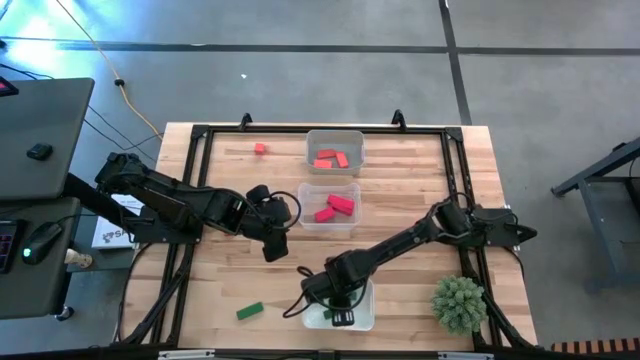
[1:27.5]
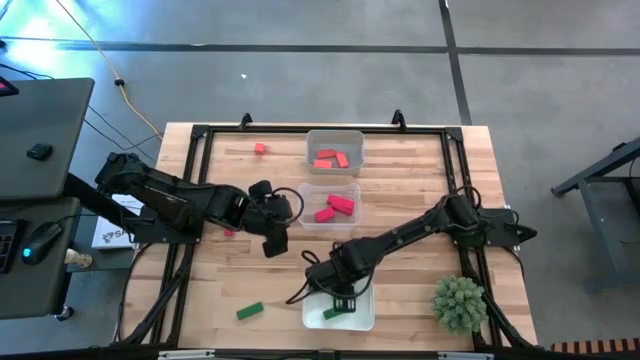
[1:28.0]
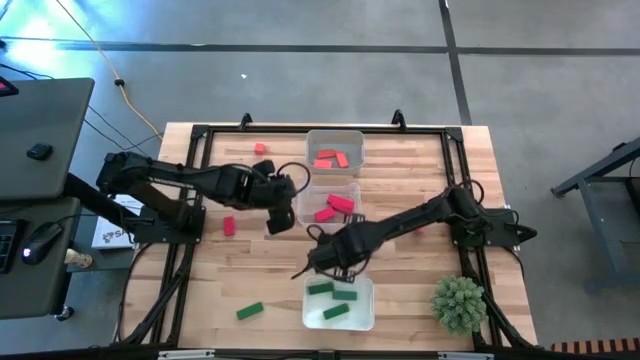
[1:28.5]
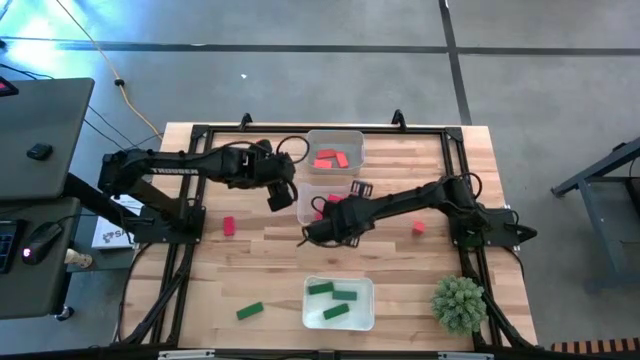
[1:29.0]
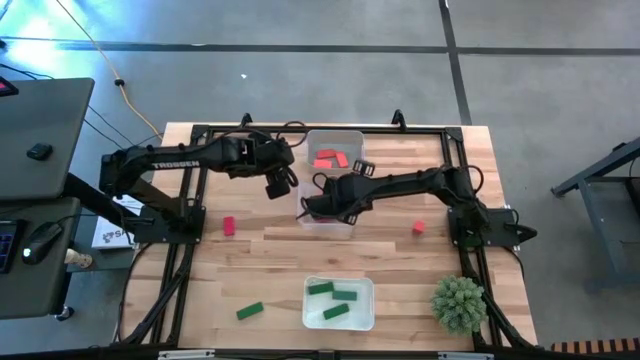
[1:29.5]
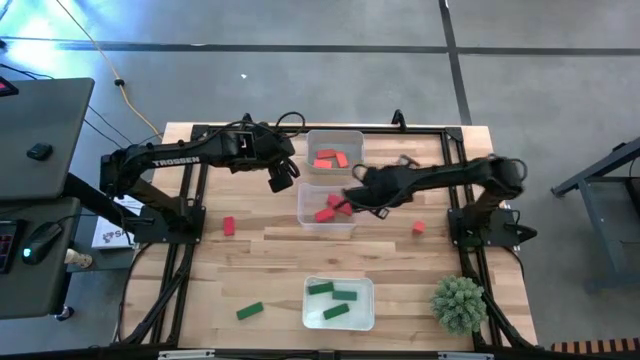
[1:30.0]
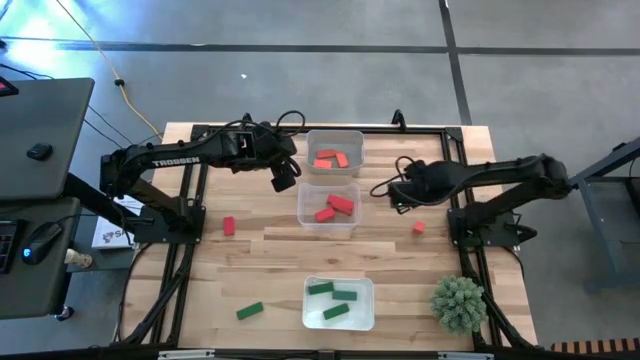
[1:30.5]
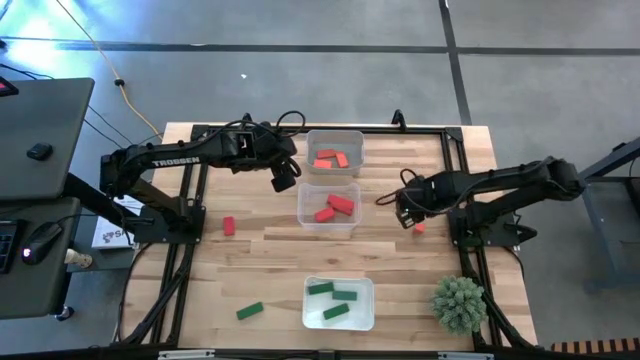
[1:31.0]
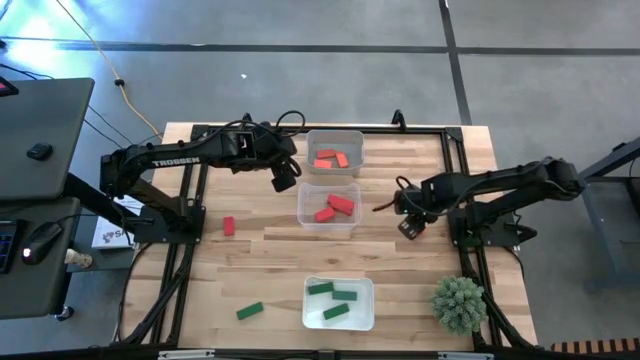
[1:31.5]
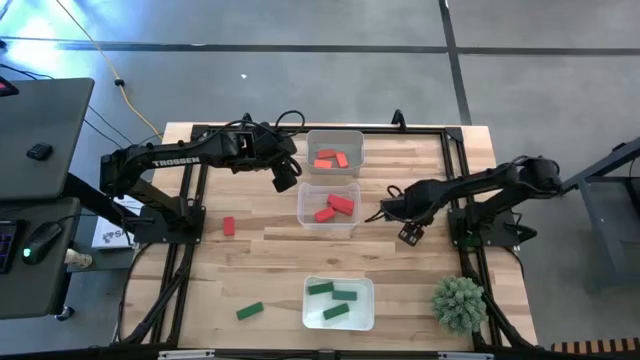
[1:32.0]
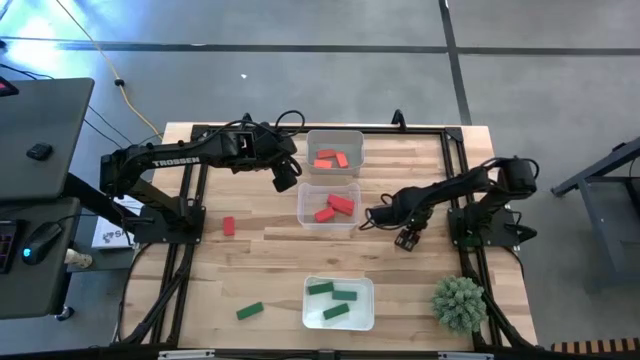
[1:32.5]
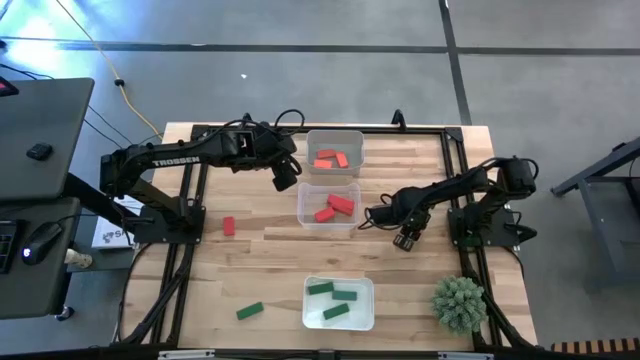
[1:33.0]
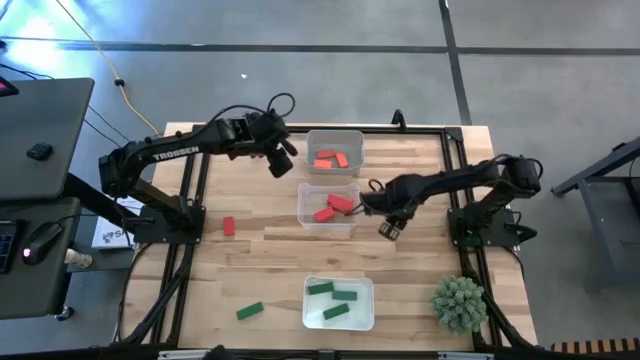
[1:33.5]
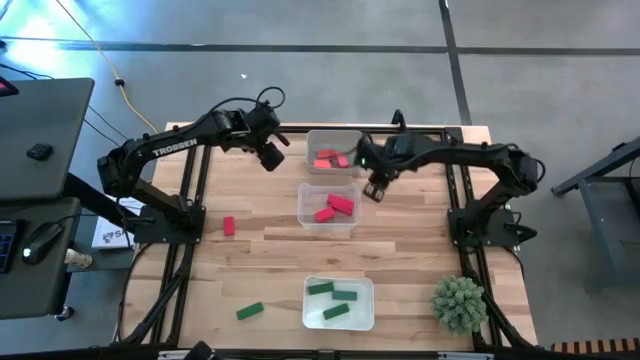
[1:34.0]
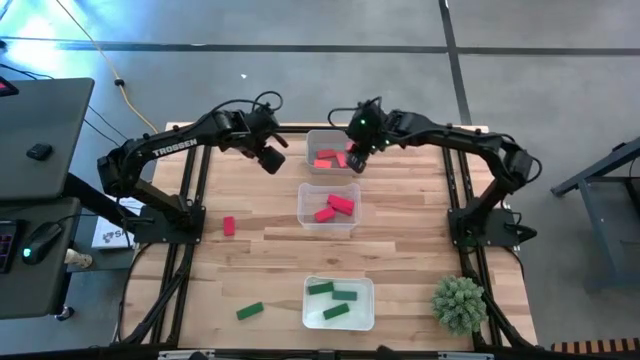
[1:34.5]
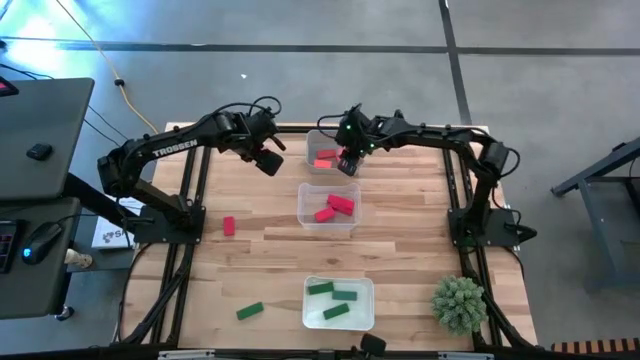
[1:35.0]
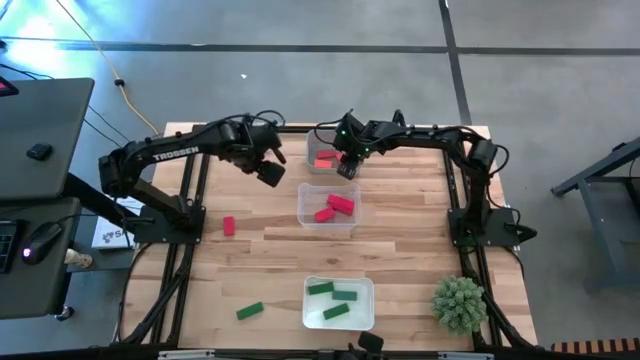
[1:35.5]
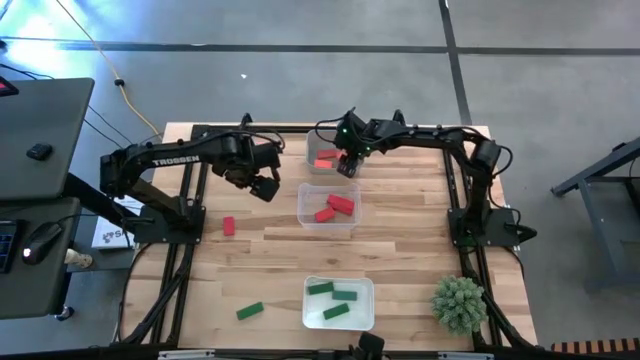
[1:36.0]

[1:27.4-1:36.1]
Task: Sort & place blocks by color
Put the orange block into the gray bin

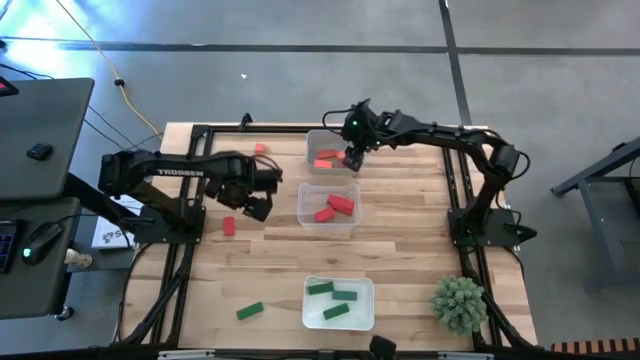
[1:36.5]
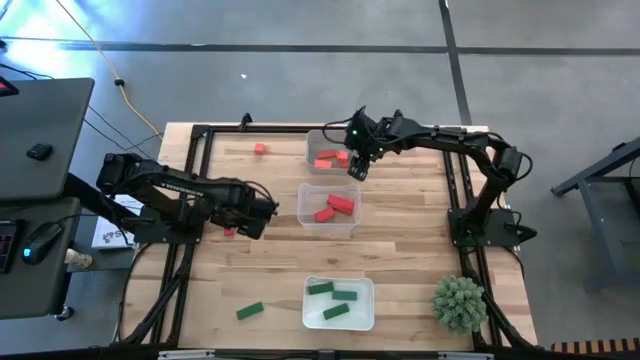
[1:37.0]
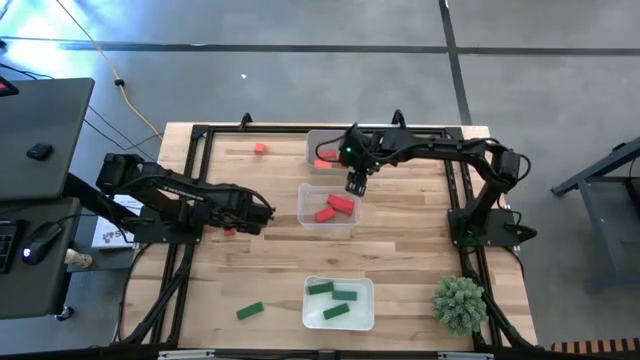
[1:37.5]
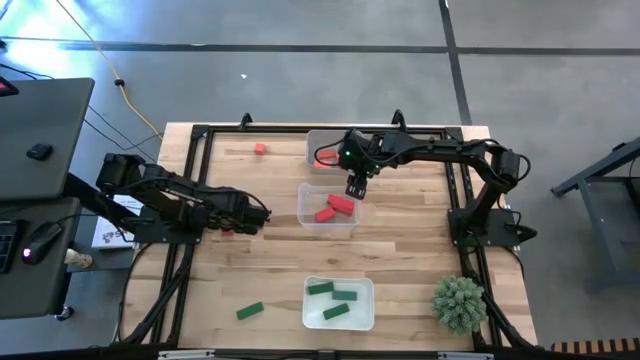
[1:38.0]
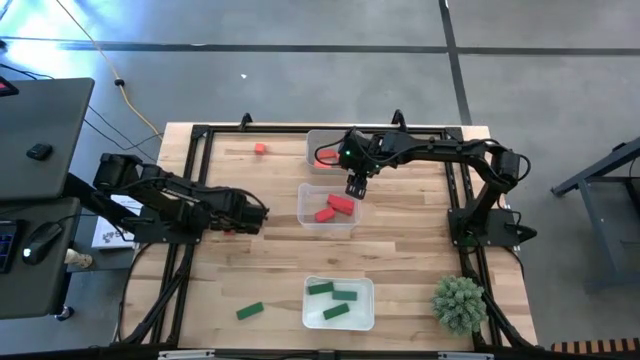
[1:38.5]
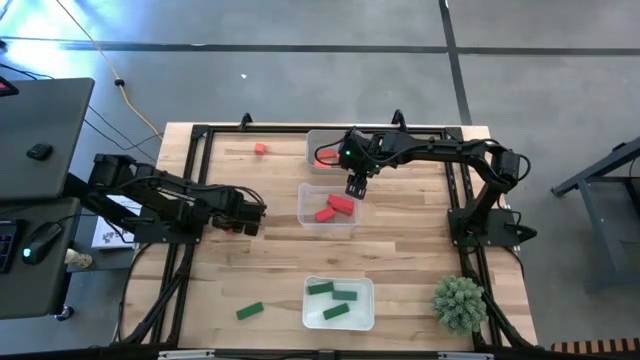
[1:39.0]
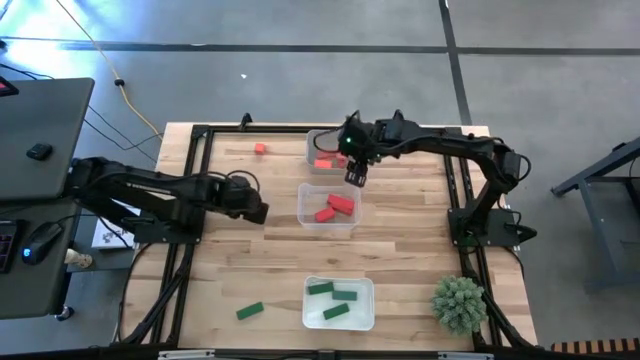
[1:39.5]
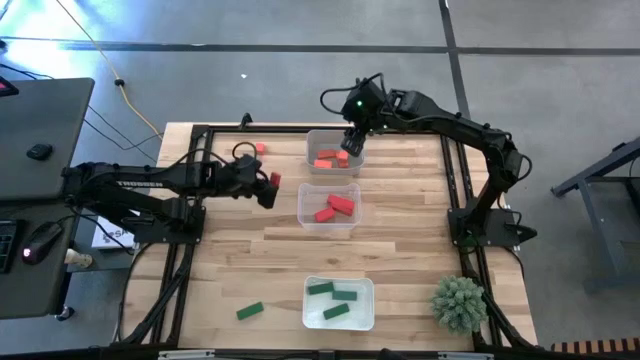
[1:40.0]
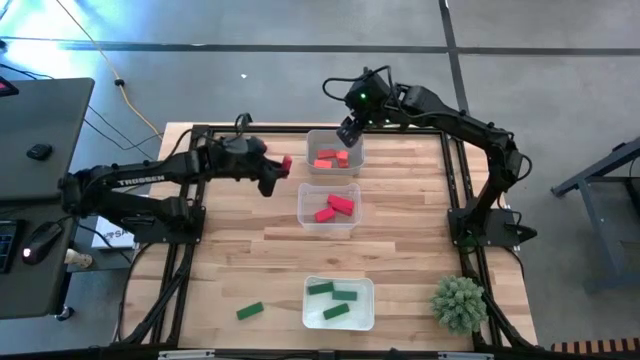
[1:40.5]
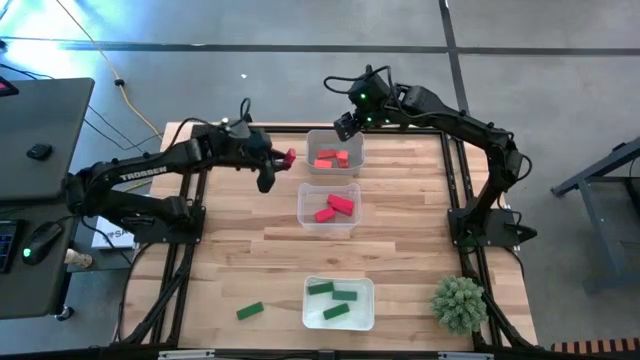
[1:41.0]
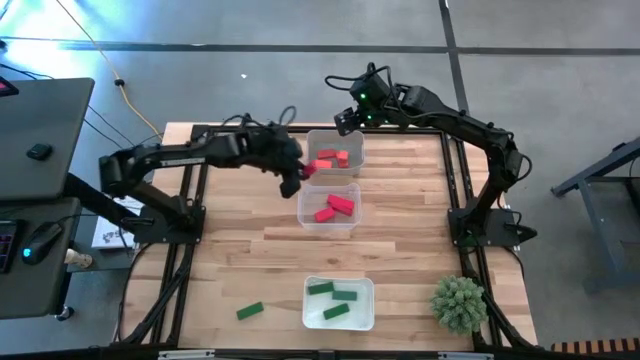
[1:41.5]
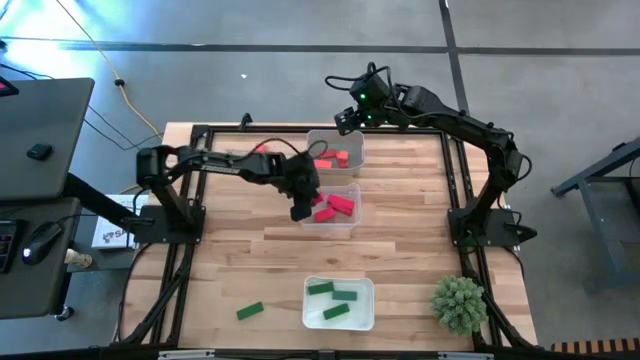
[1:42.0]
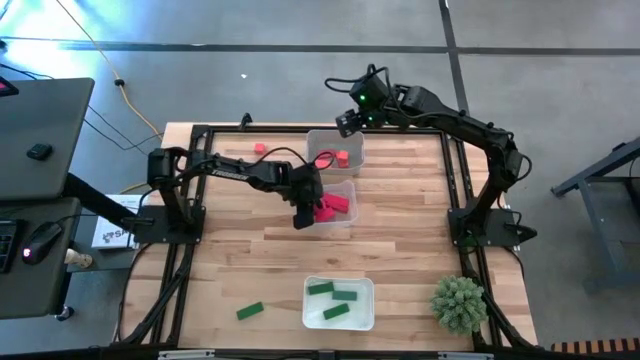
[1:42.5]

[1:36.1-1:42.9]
Put the red block into the transparent bin

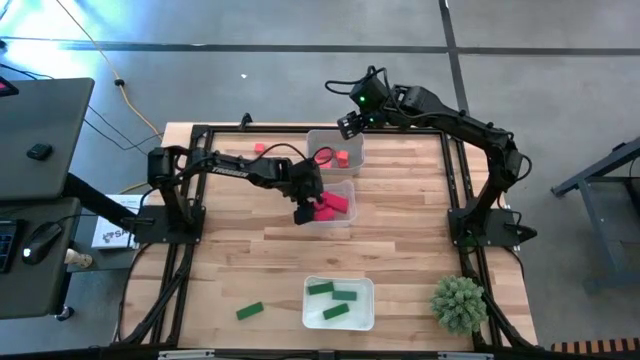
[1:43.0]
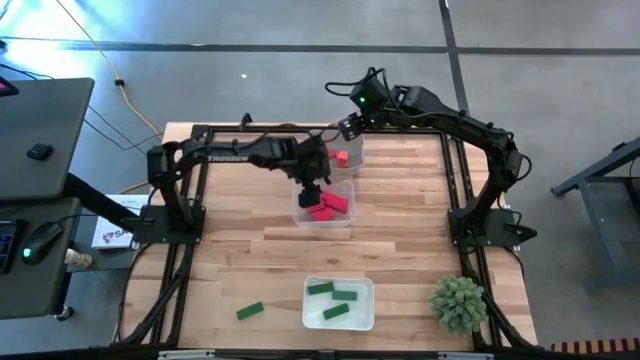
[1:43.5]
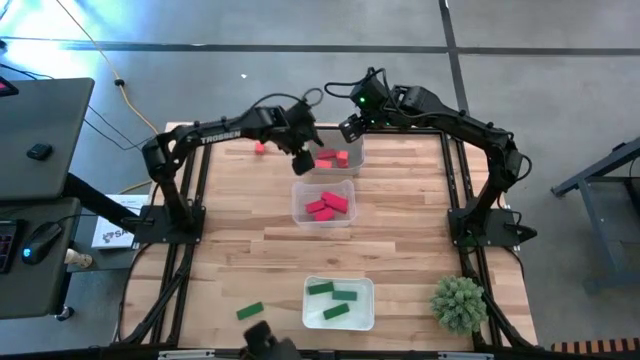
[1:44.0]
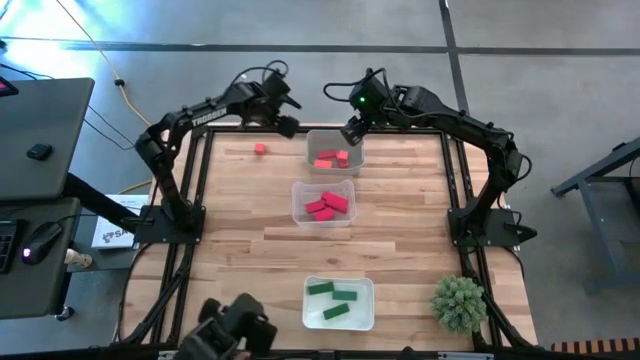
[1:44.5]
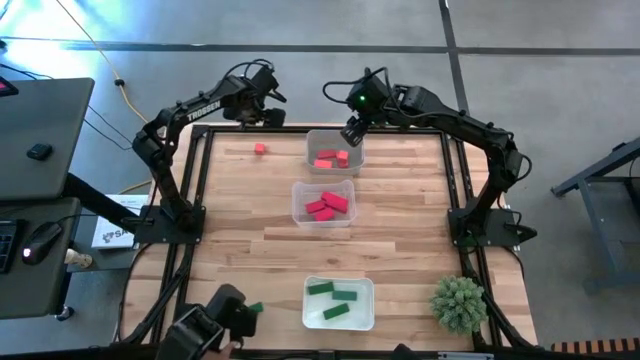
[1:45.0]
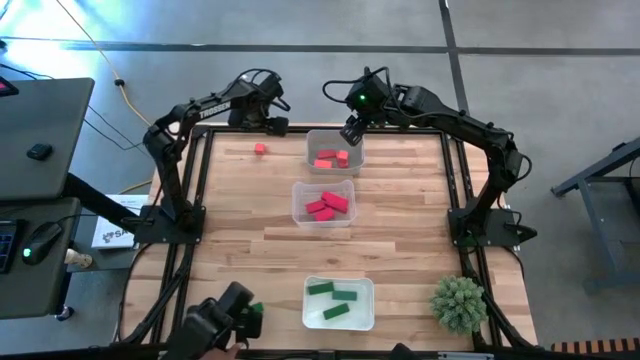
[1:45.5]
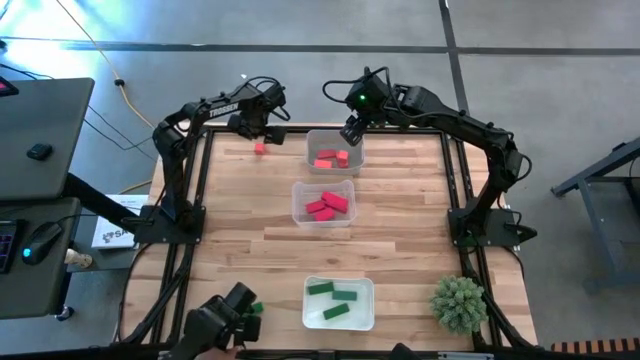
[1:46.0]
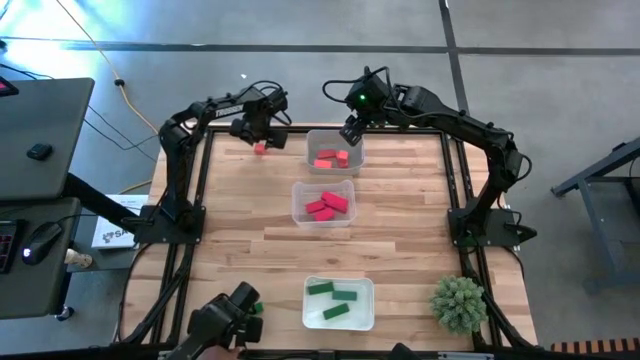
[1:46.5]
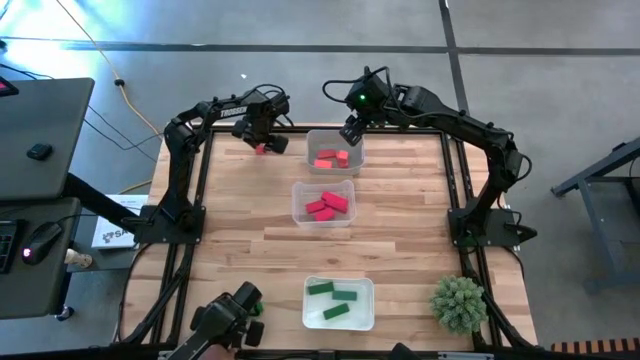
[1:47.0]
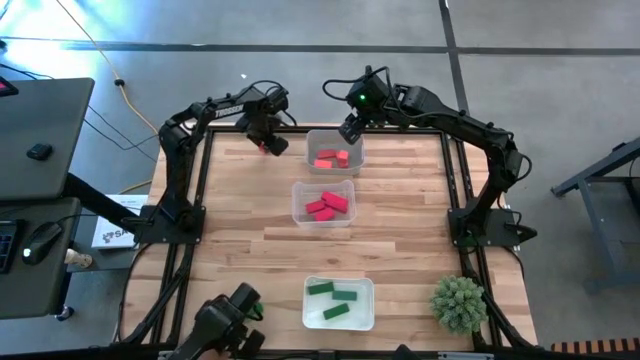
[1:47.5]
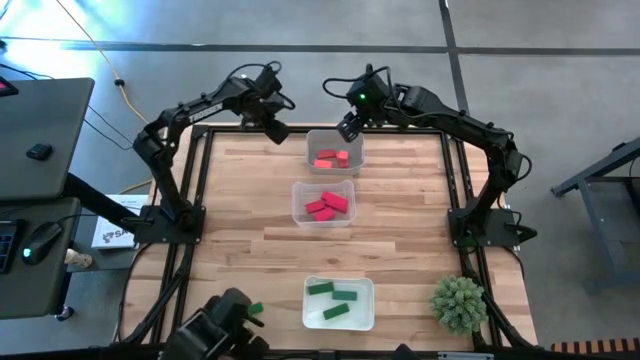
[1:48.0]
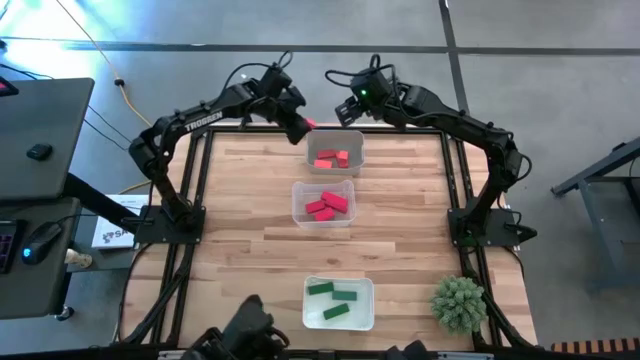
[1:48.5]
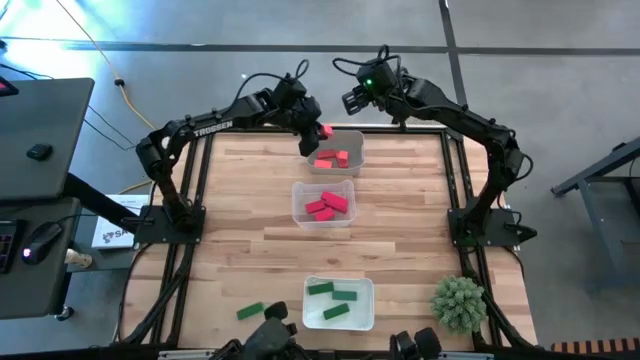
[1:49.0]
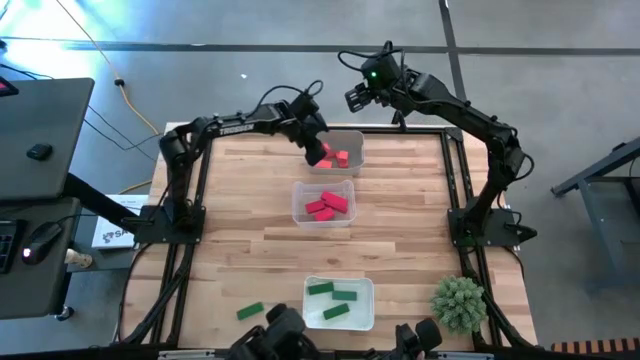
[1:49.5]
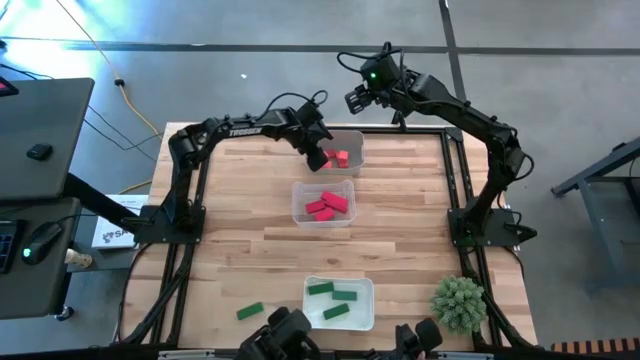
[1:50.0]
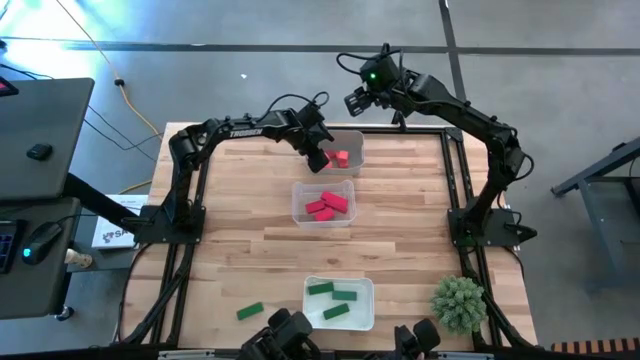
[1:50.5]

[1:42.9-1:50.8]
Put the orange block into the gray bin
